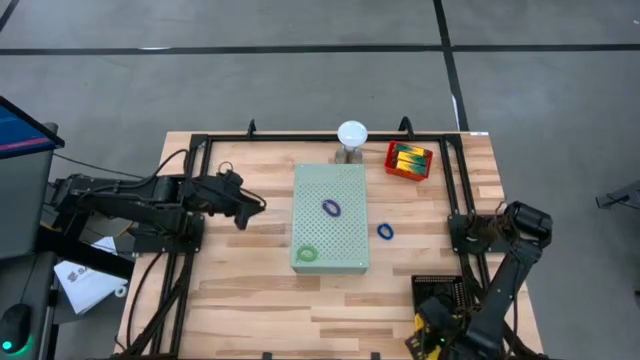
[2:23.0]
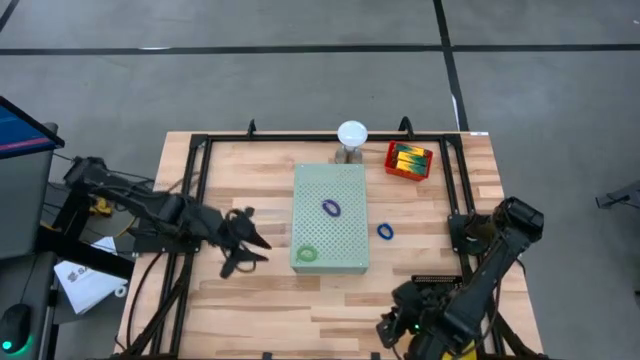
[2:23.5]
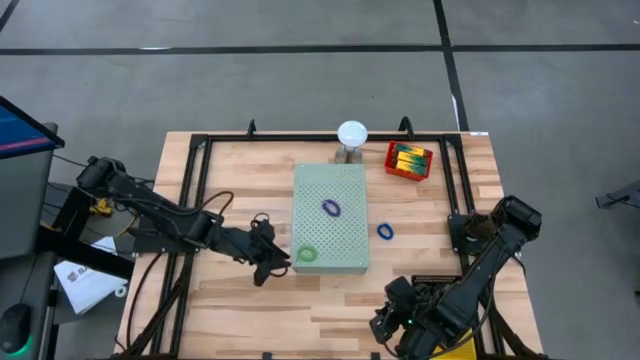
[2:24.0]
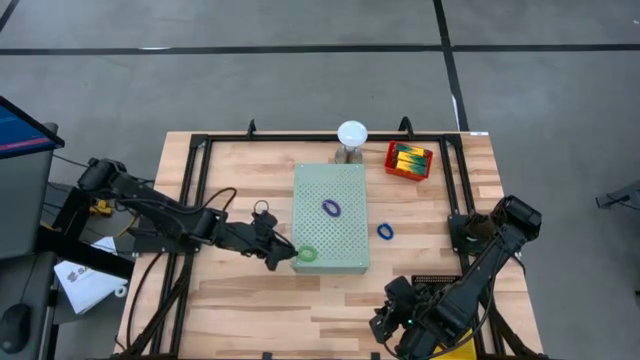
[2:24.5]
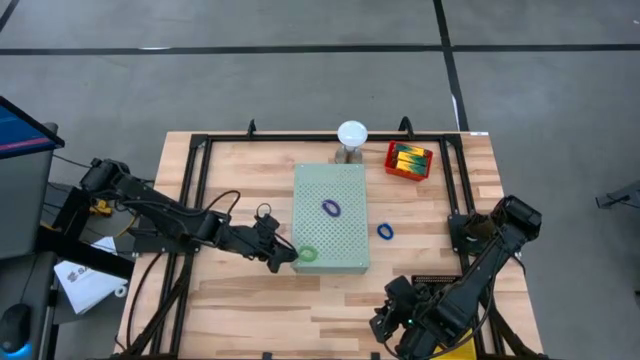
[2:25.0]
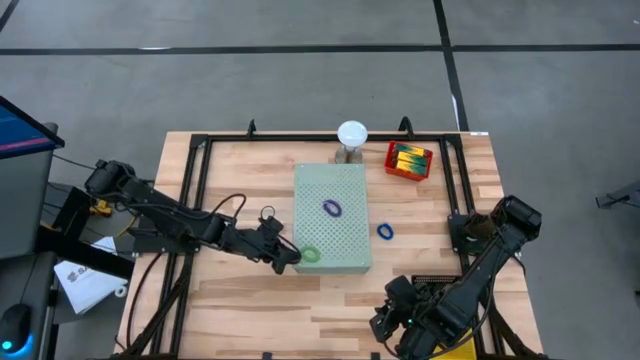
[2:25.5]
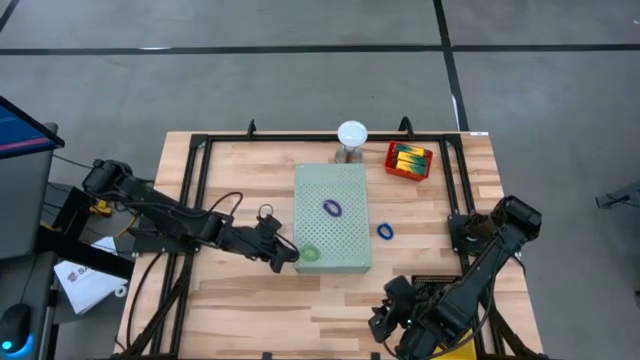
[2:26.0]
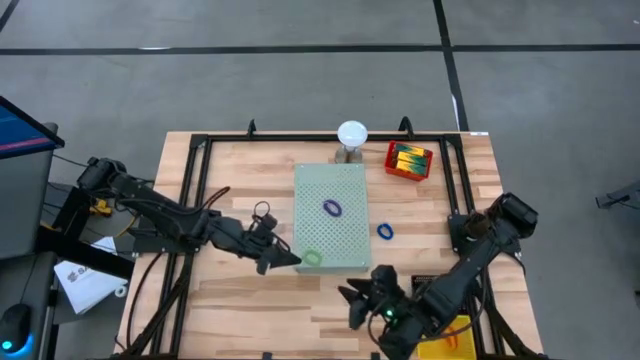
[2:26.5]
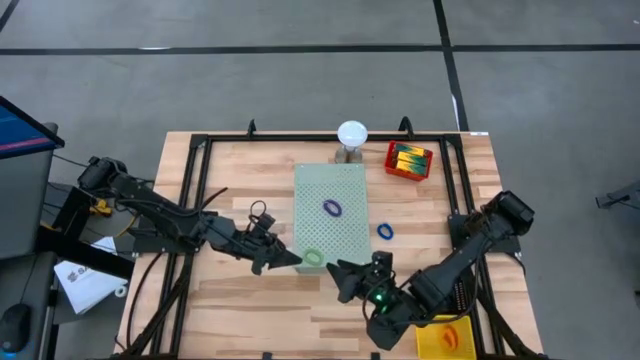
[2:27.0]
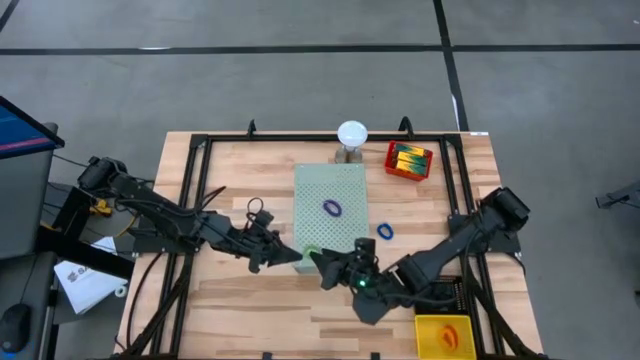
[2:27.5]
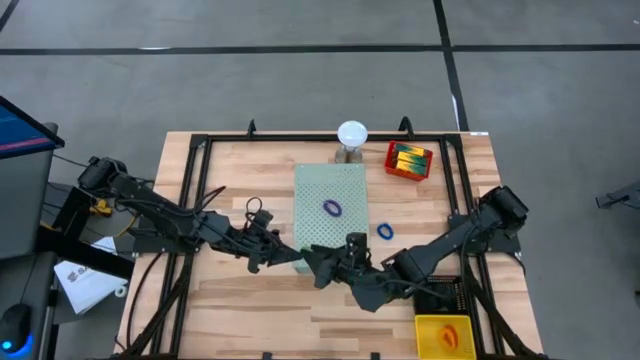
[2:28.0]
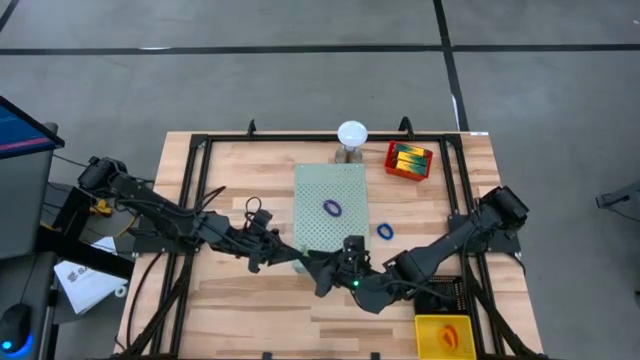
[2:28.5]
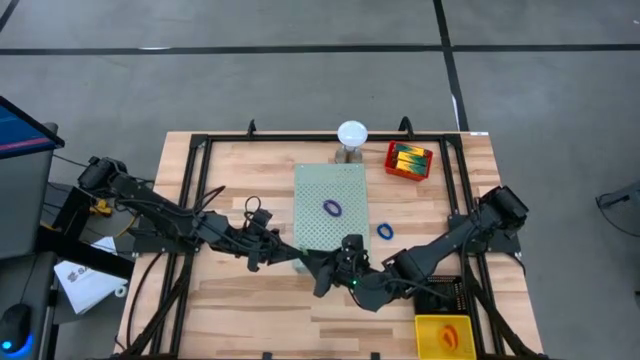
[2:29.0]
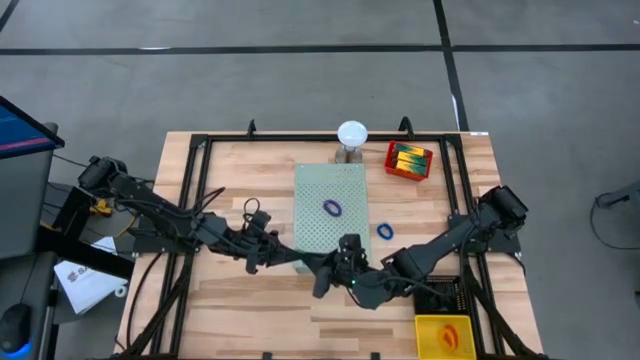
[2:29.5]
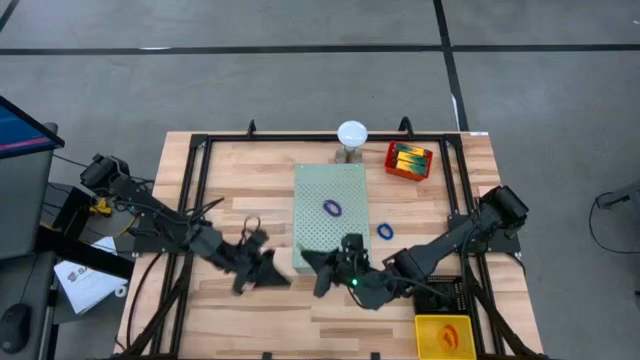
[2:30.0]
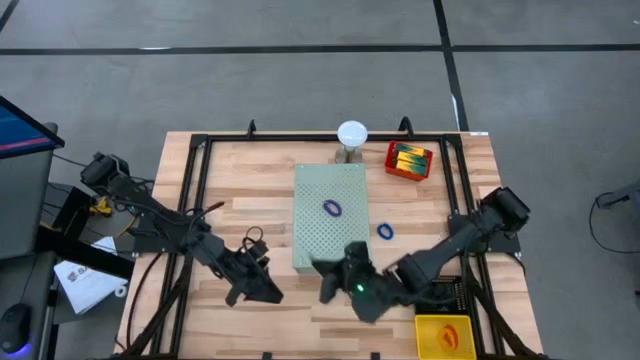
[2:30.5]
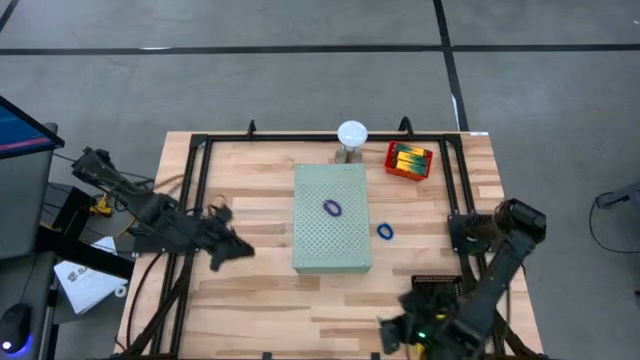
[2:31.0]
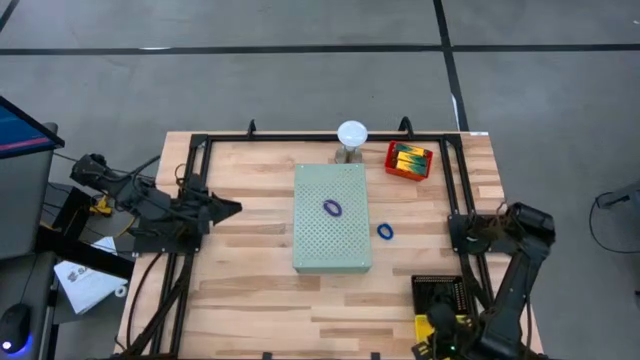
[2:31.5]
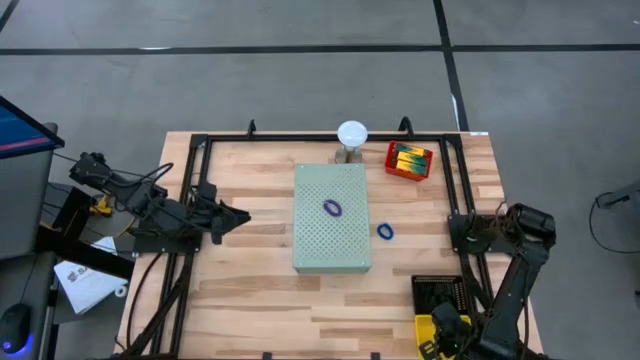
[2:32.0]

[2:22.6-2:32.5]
Task: Pick & Place Office Desk Supplies
Put the green spring keychain into the yellow bin

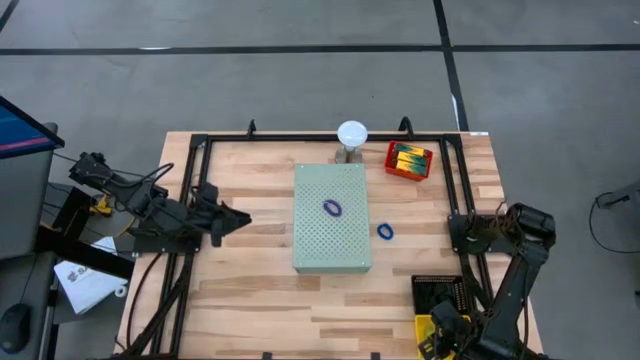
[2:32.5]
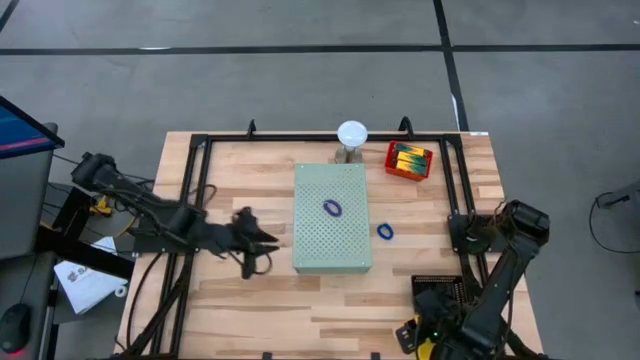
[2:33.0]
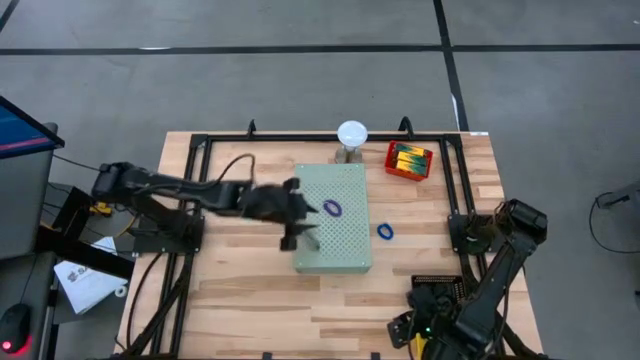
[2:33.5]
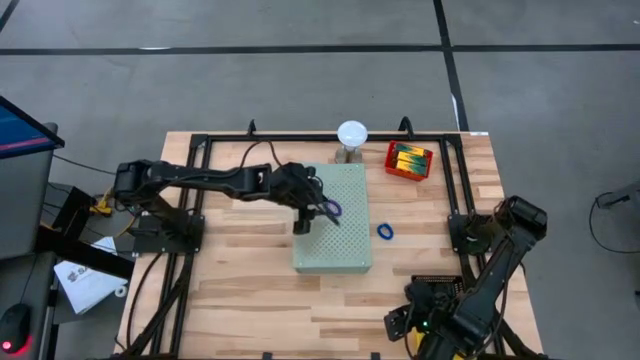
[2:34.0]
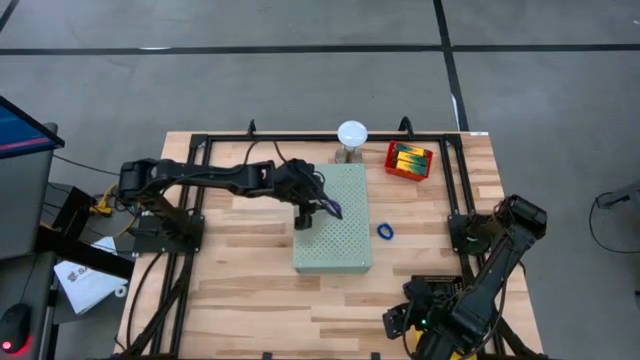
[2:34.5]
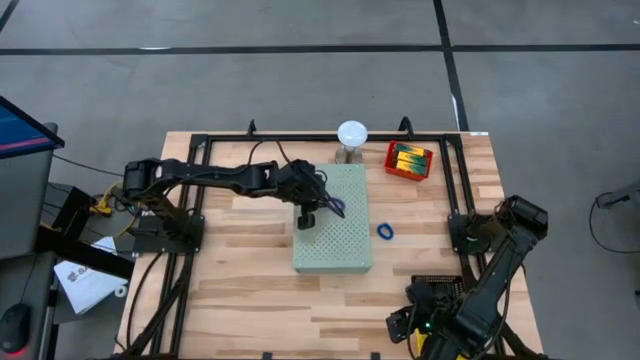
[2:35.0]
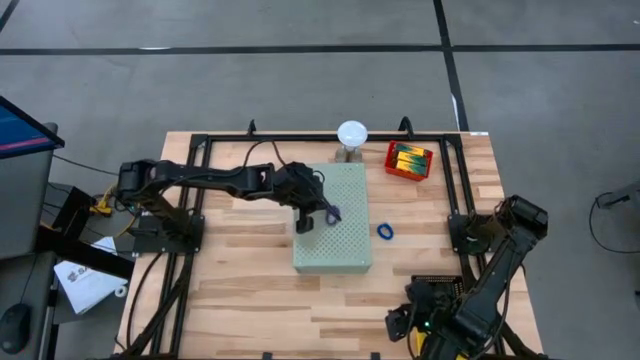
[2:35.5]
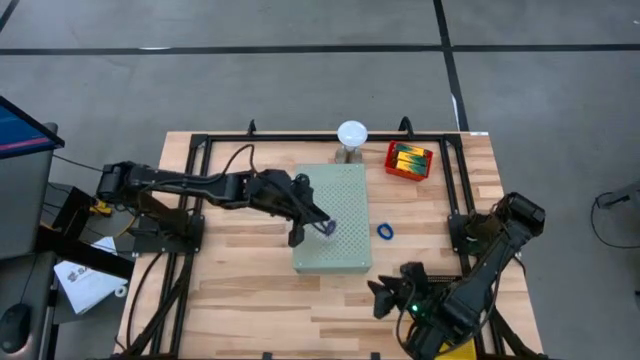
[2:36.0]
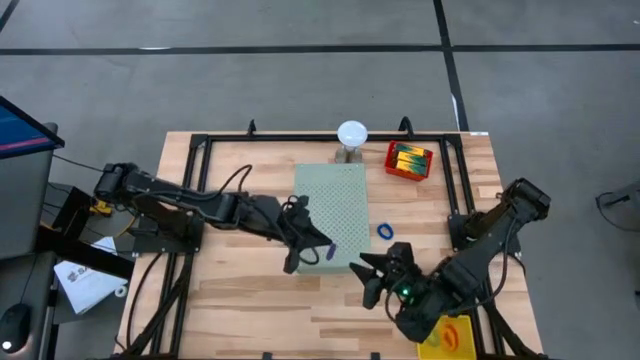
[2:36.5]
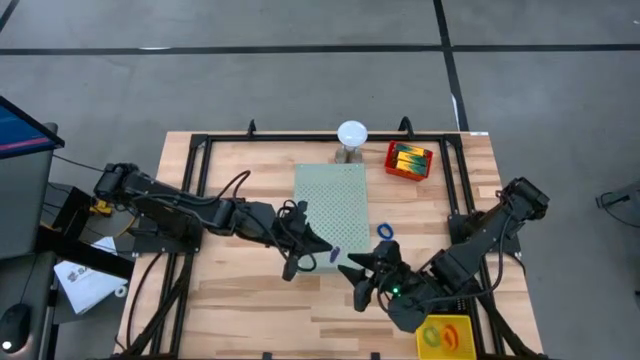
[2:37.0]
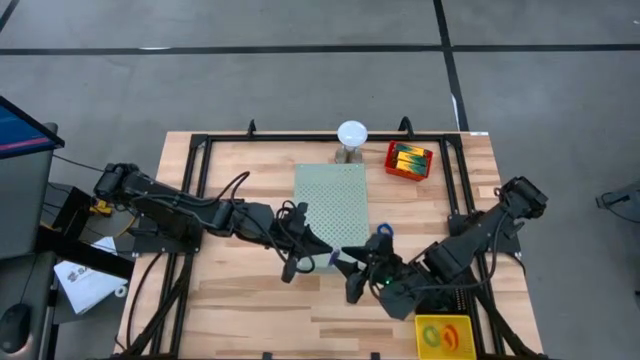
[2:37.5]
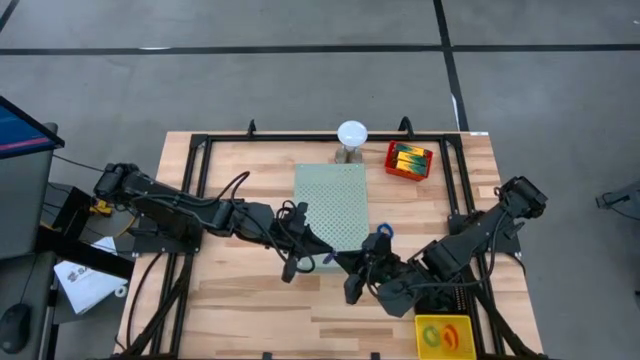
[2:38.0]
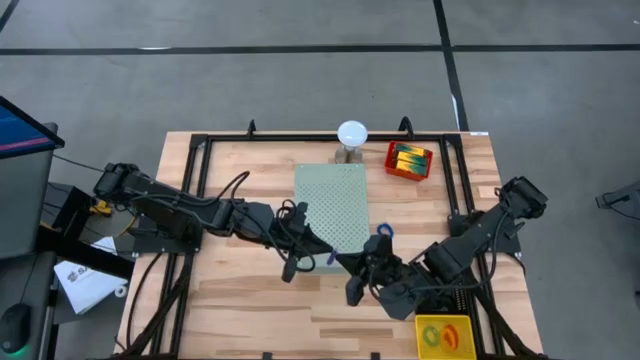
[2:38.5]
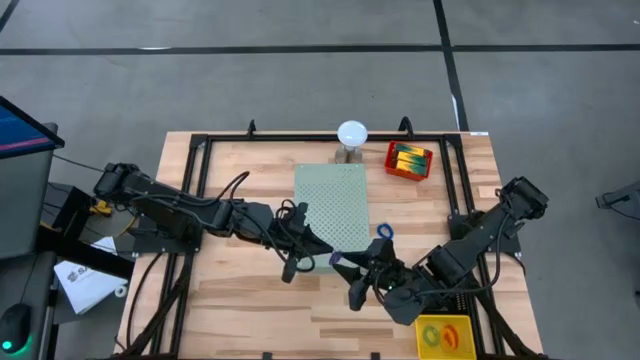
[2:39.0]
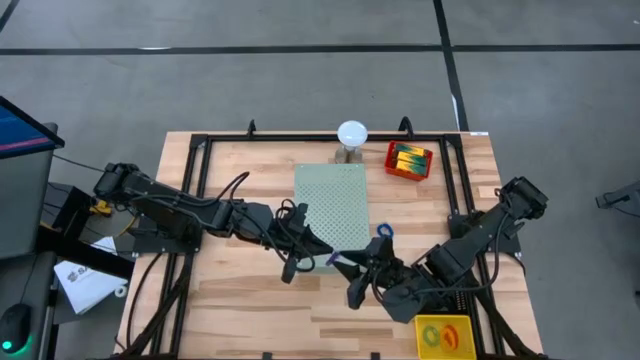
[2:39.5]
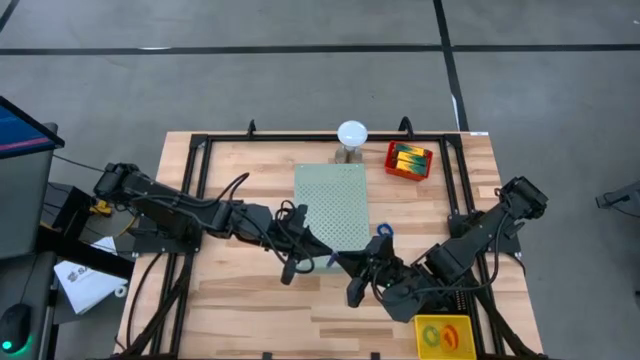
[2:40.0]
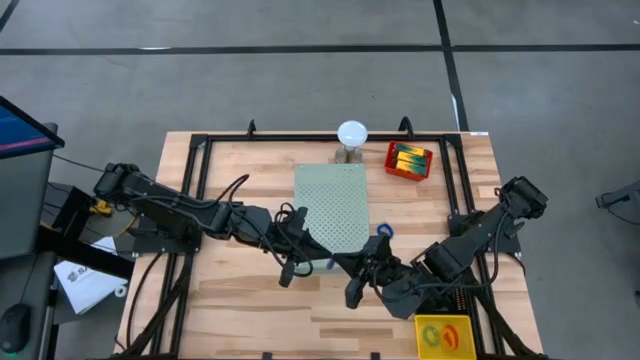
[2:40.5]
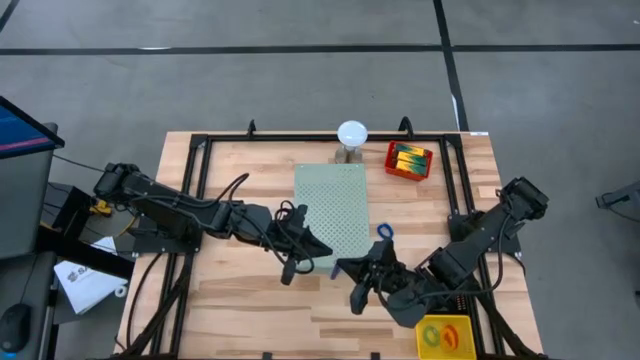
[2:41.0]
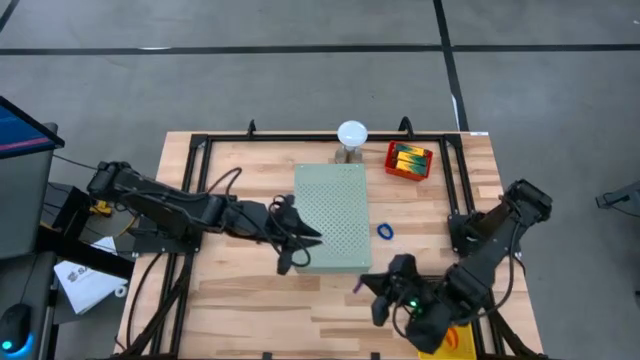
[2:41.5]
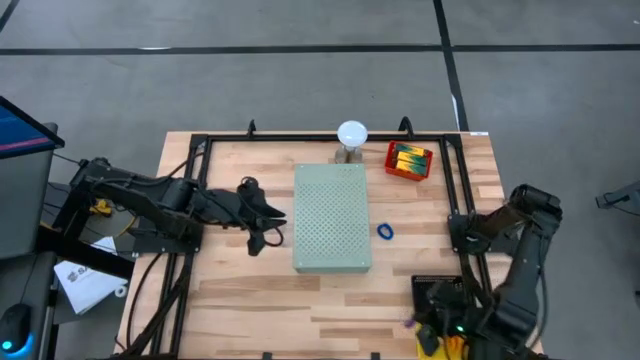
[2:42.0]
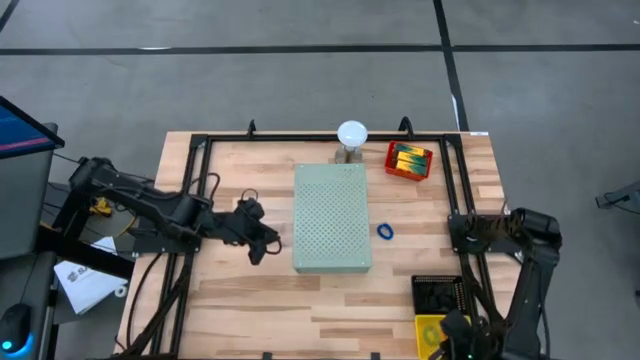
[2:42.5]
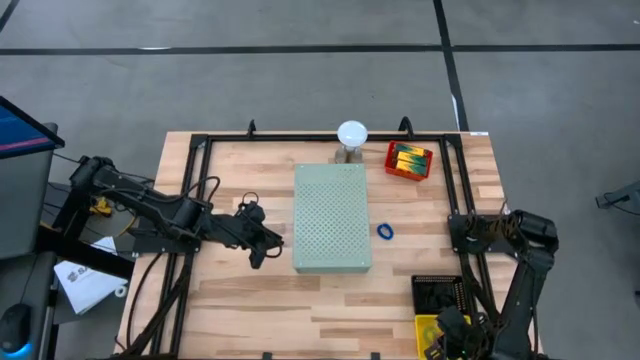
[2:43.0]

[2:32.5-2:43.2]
Put the purple spring keychain into the yellow bin
